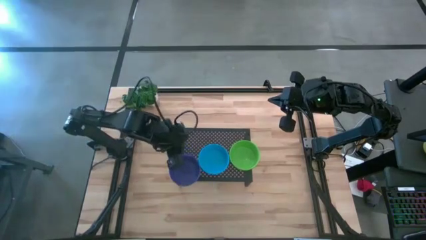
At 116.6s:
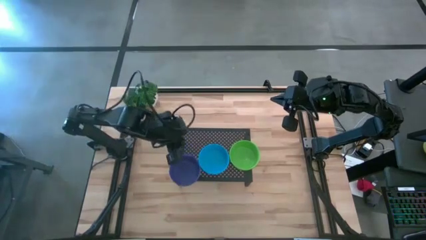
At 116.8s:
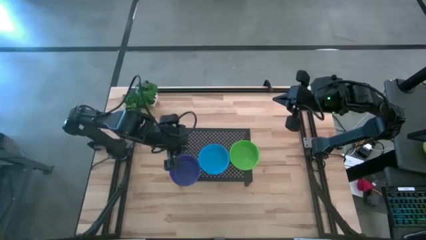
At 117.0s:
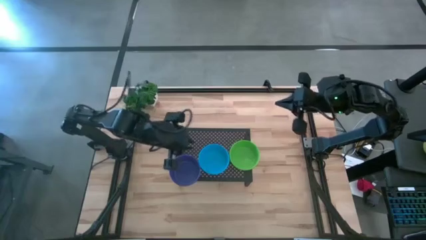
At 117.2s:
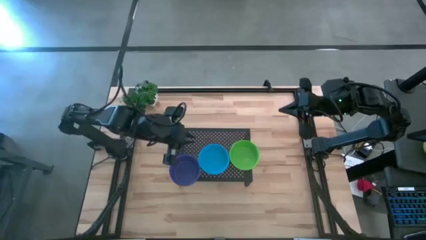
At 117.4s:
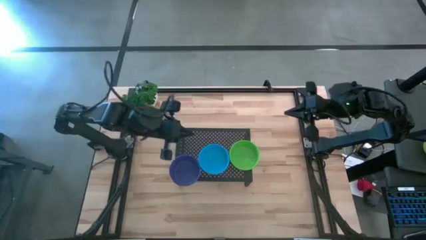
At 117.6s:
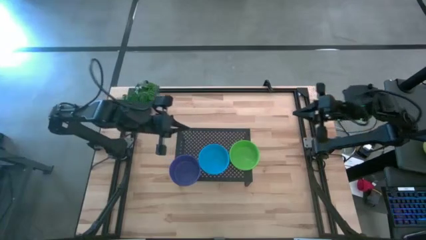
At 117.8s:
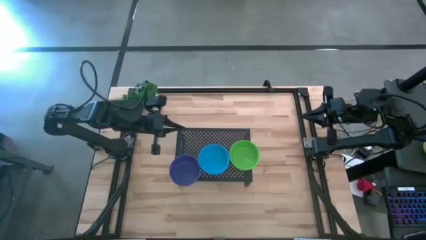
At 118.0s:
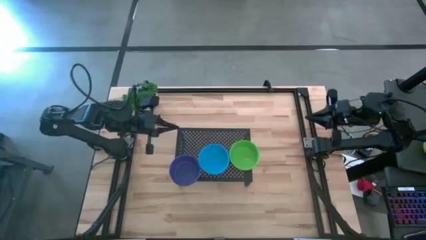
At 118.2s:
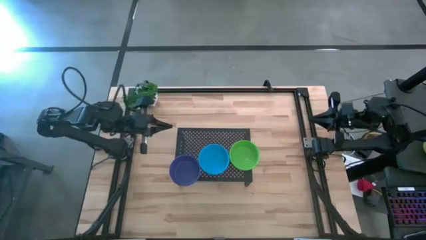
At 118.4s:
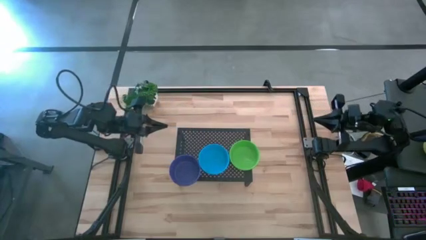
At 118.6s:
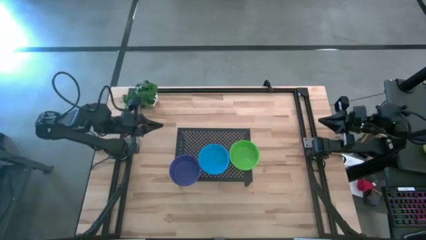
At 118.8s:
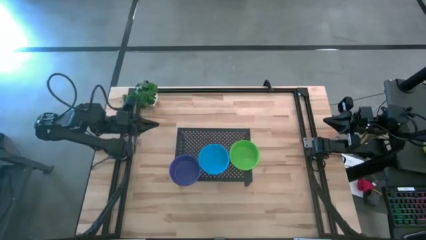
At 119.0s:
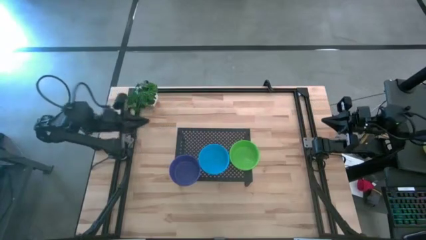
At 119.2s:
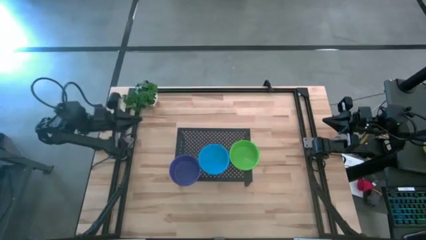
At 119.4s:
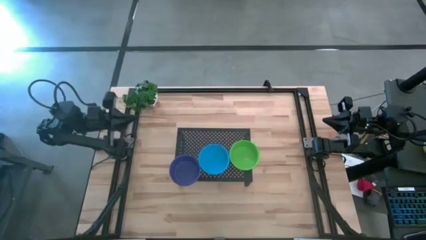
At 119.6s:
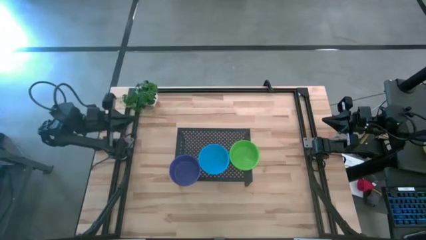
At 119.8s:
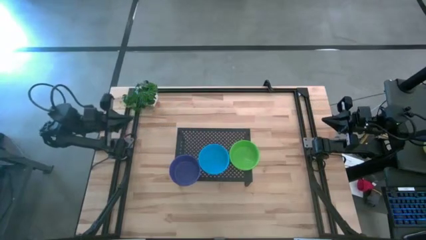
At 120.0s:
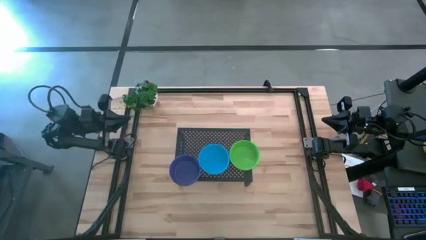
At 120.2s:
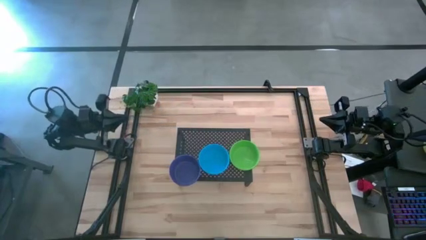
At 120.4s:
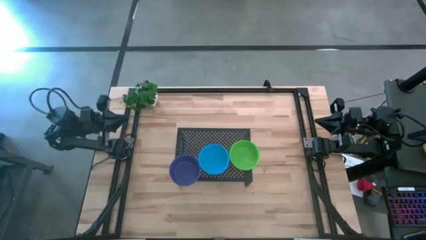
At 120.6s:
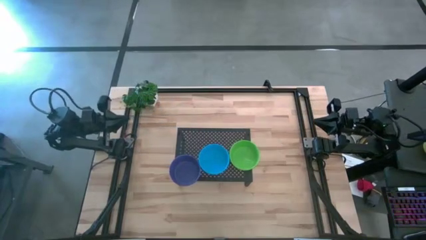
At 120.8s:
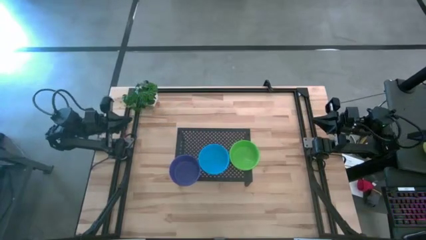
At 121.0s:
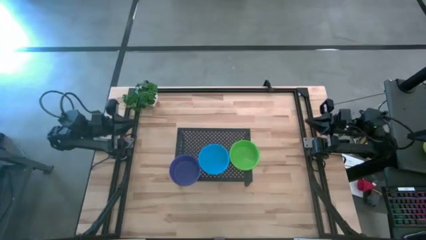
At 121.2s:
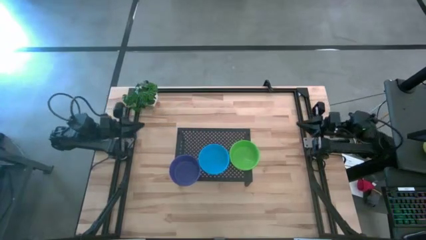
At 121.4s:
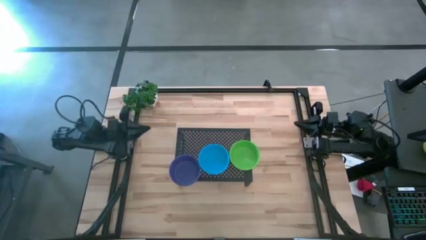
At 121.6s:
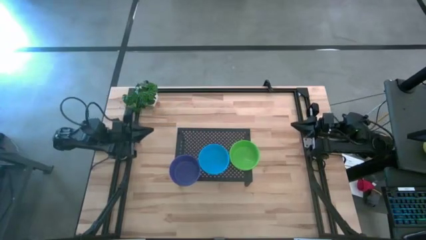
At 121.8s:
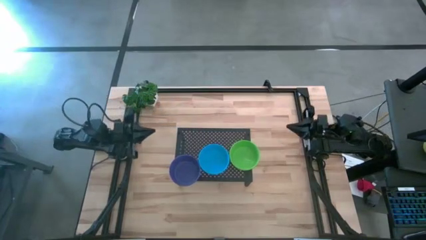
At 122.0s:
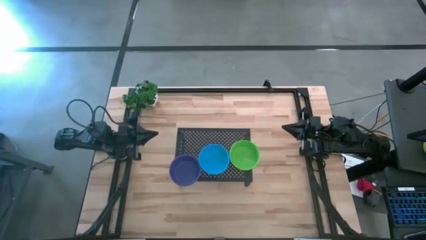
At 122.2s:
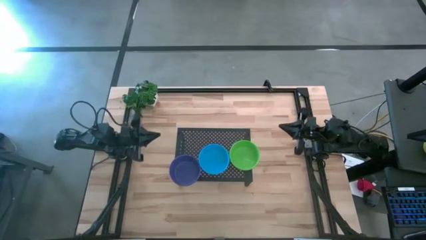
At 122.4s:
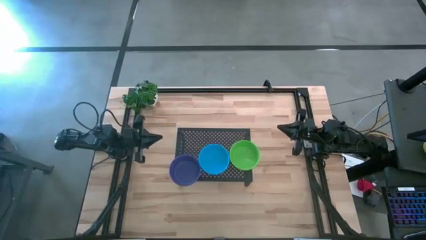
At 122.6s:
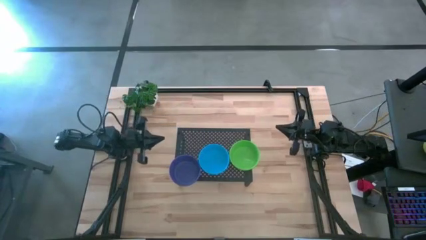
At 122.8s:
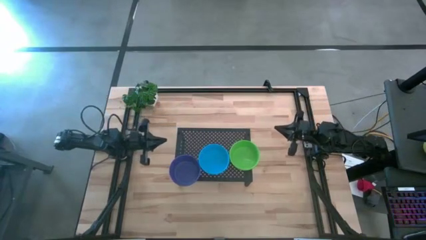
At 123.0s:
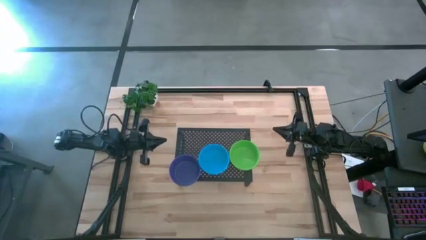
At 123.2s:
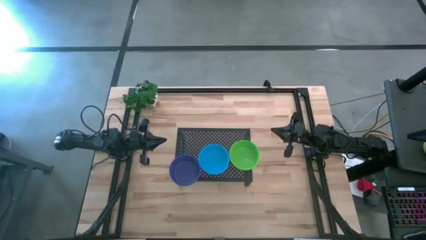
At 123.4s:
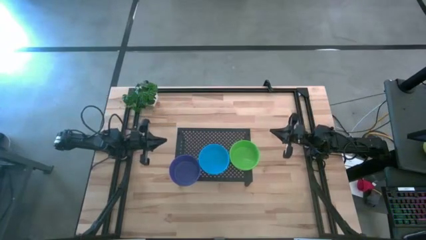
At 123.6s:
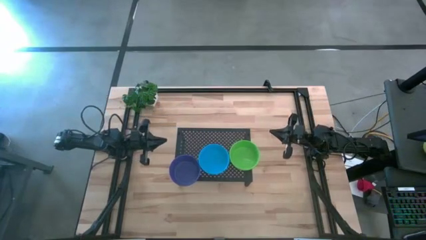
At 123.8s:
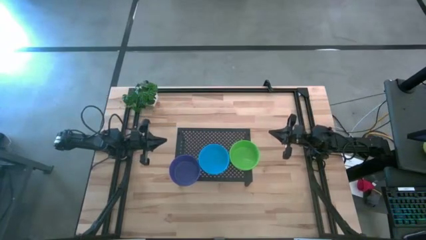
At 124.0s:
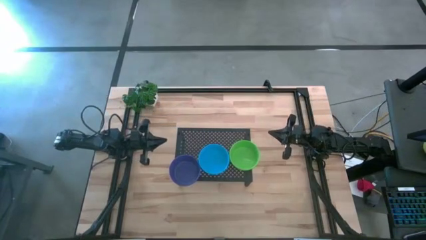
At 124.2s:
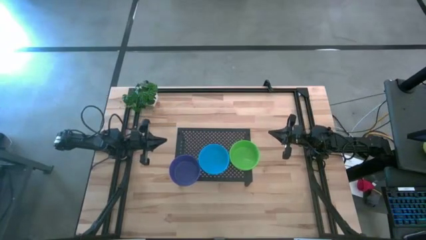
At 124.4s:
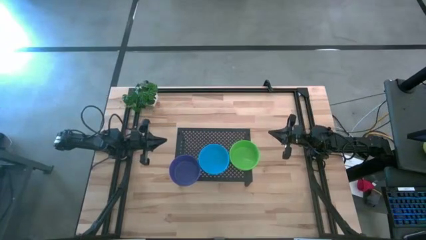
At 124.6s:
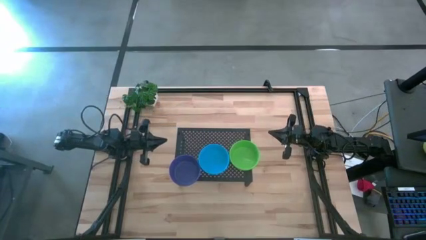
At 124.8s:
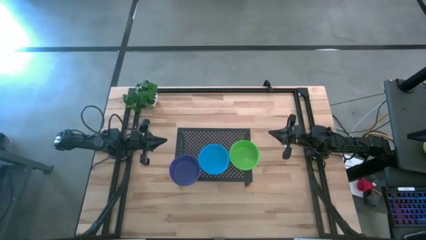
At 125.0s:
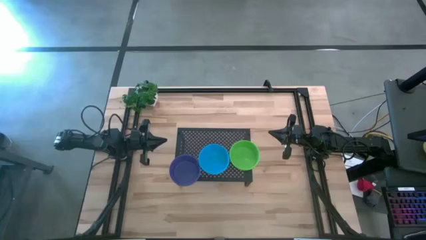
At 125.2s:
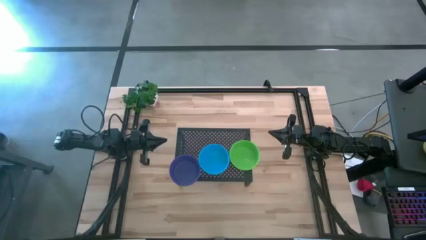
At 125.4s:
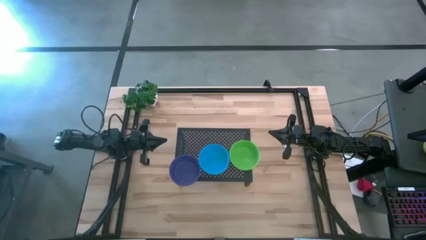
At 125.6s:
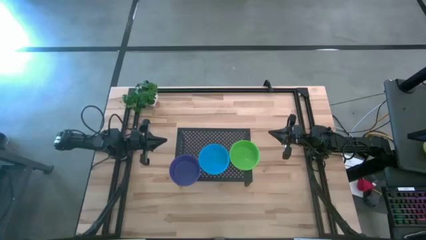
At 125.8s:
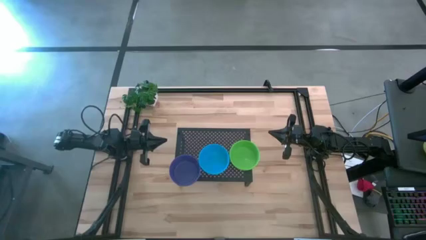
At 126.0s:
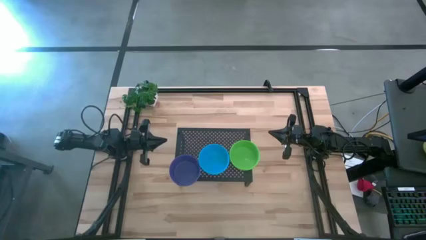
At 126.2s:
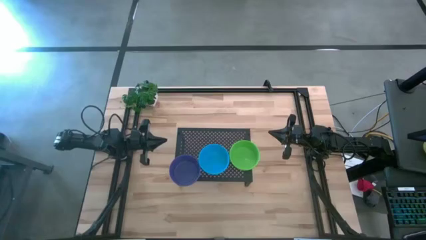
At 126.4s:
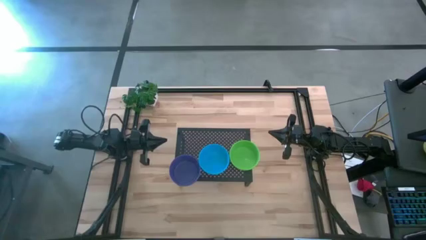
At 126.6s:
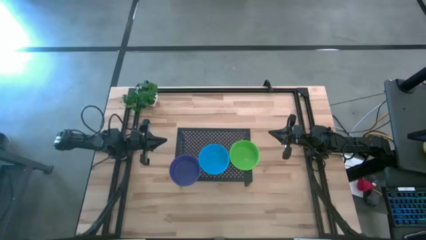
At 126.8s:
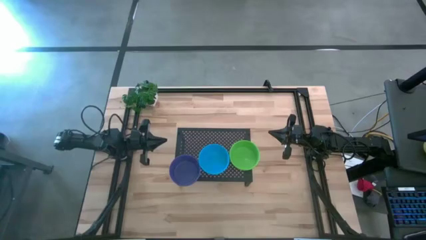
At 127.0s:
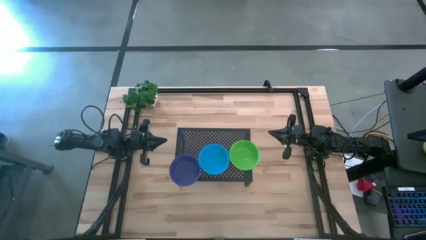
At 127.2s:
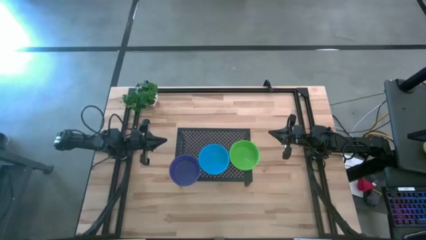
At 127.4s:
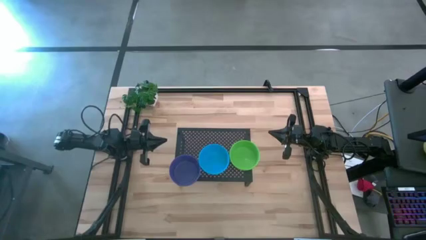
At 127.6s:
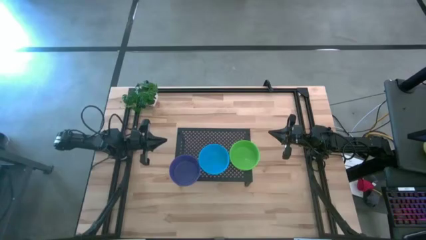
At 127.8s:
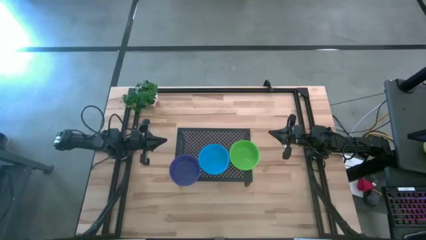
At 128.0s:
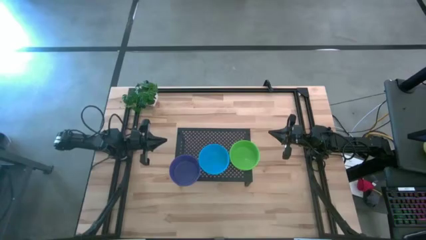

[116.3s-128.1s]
Task: Pick & Place Mini bowls
Return to Home Position
